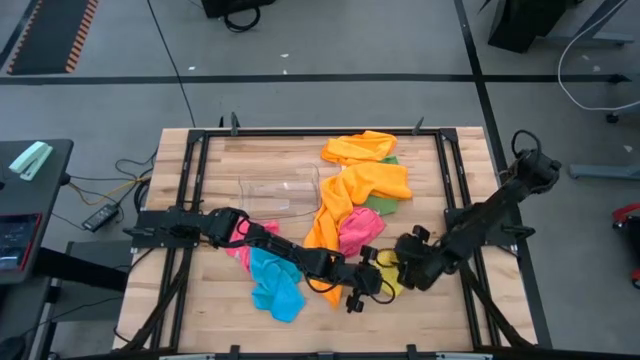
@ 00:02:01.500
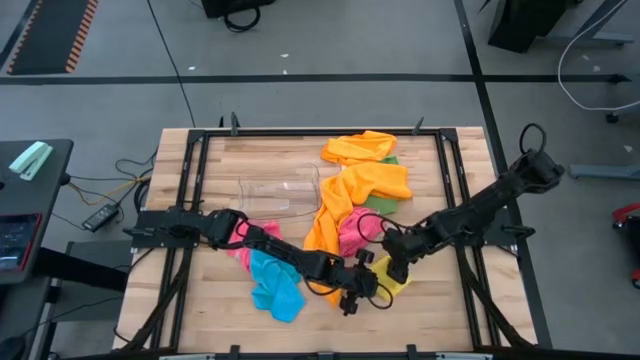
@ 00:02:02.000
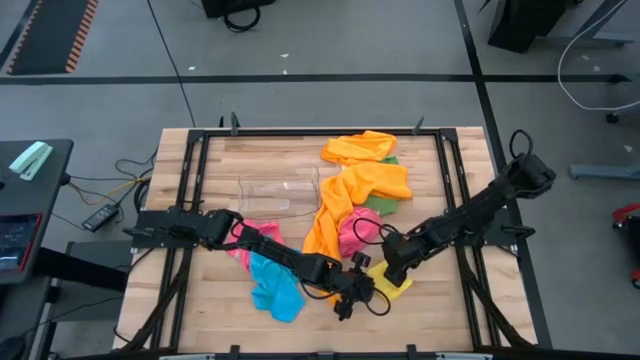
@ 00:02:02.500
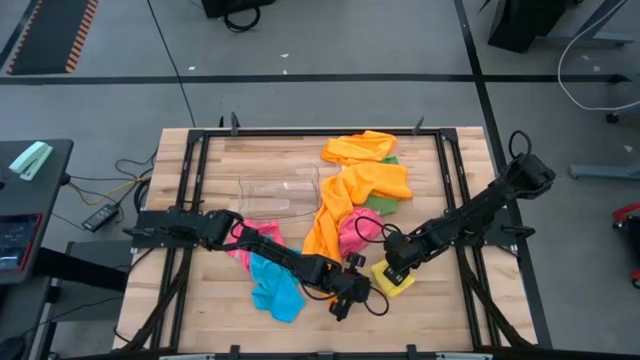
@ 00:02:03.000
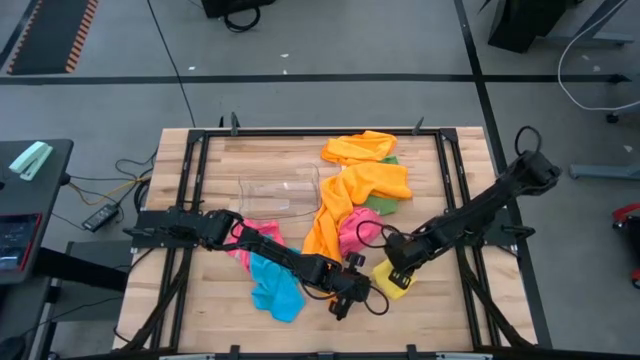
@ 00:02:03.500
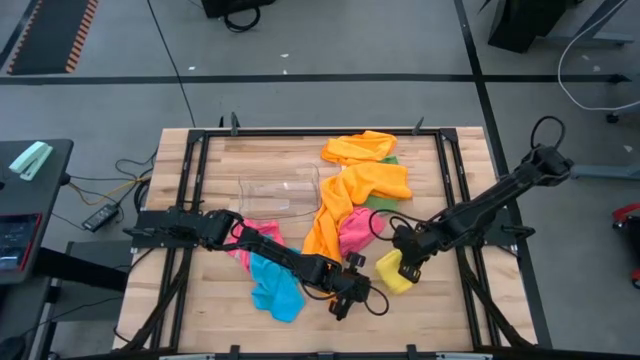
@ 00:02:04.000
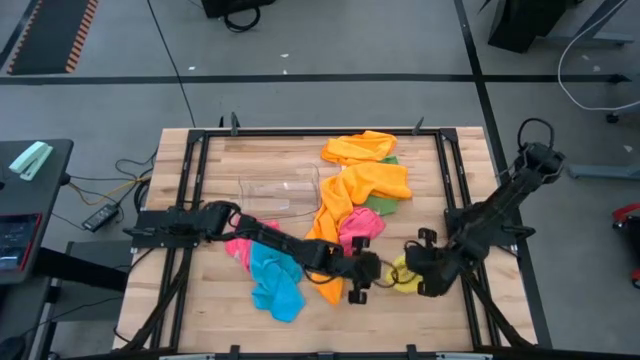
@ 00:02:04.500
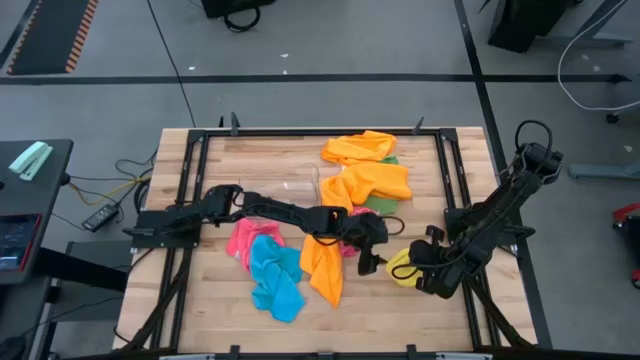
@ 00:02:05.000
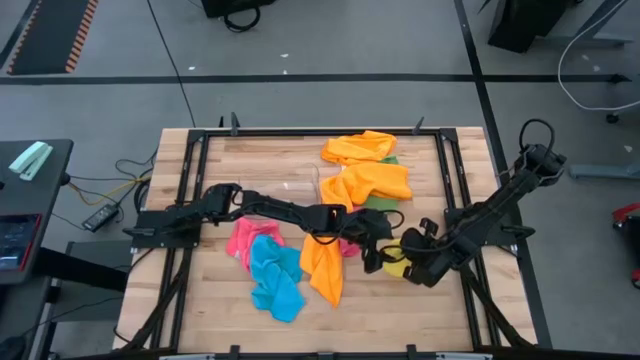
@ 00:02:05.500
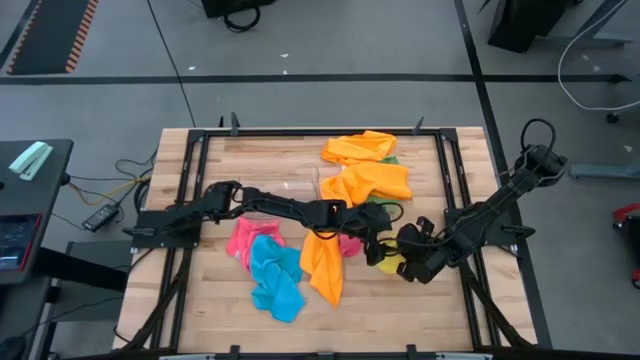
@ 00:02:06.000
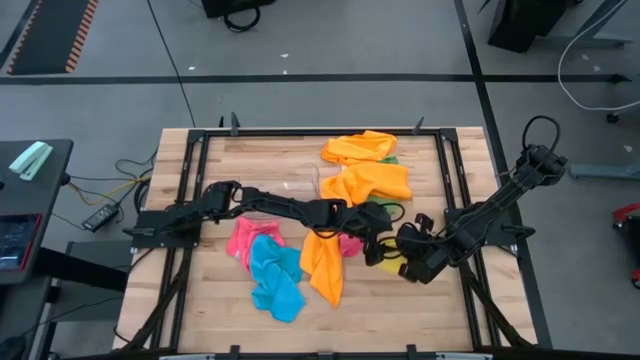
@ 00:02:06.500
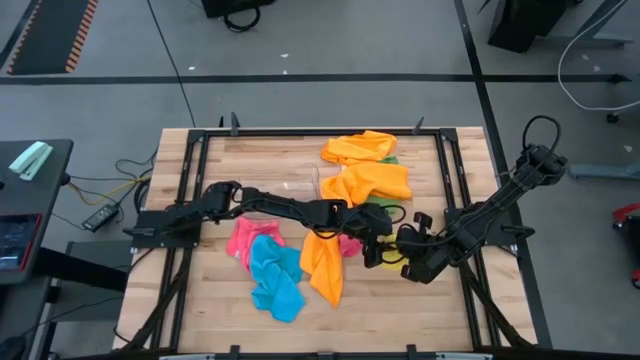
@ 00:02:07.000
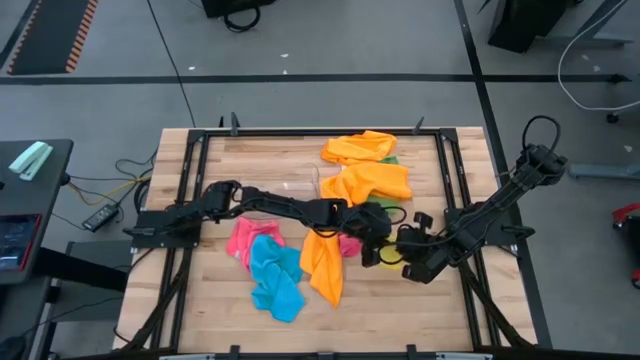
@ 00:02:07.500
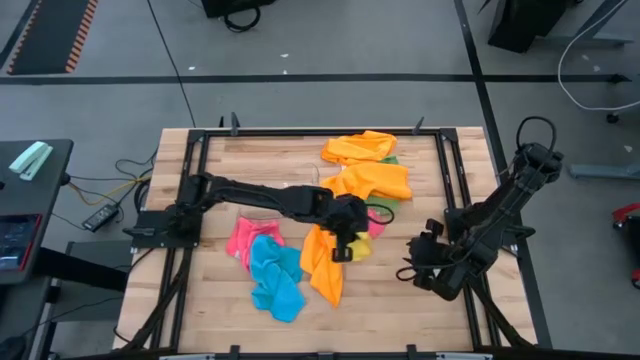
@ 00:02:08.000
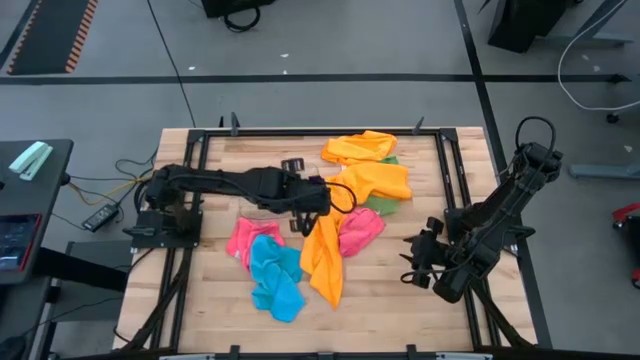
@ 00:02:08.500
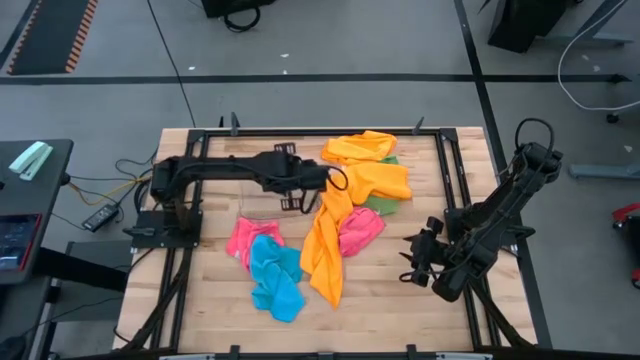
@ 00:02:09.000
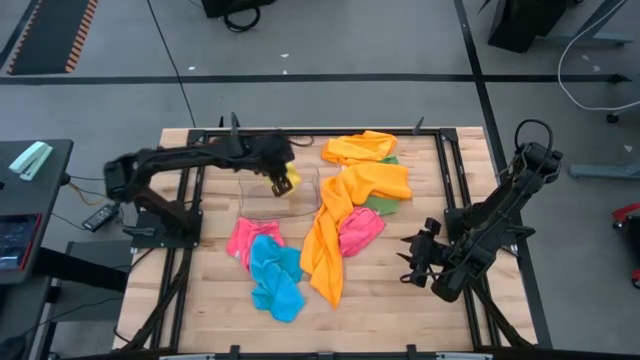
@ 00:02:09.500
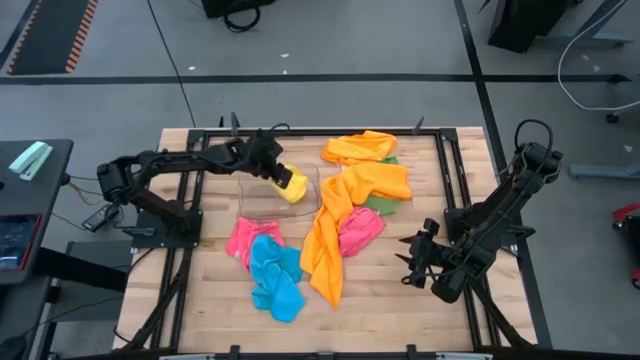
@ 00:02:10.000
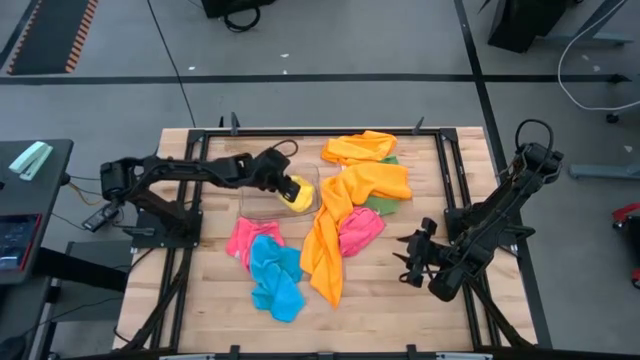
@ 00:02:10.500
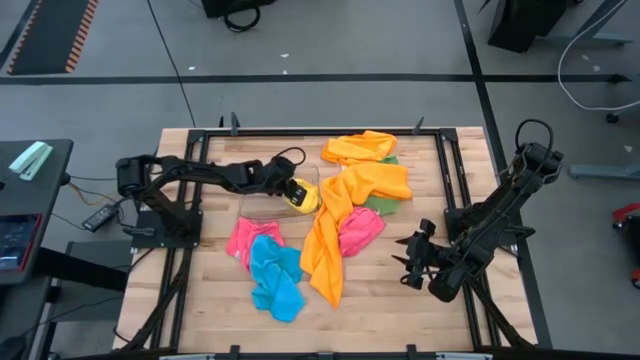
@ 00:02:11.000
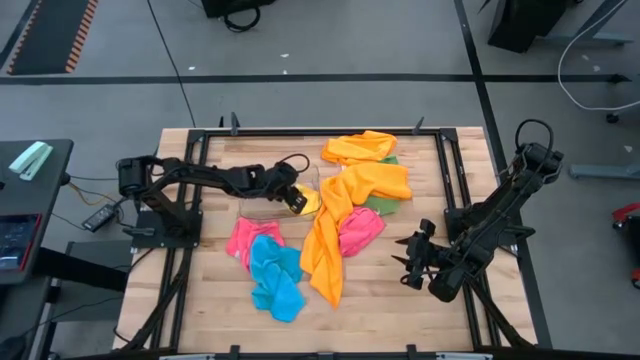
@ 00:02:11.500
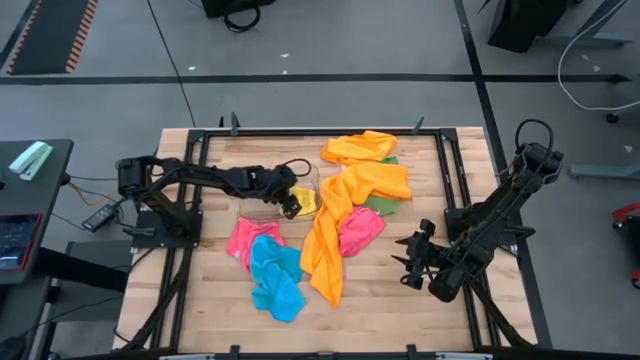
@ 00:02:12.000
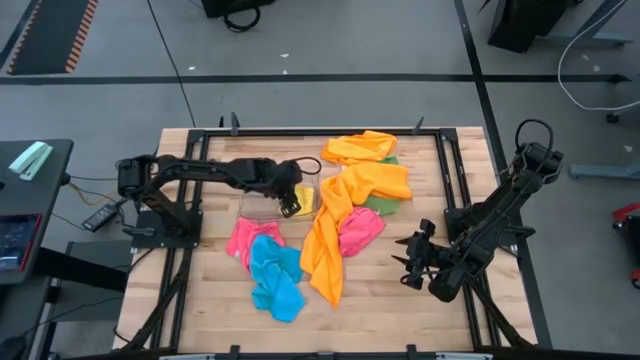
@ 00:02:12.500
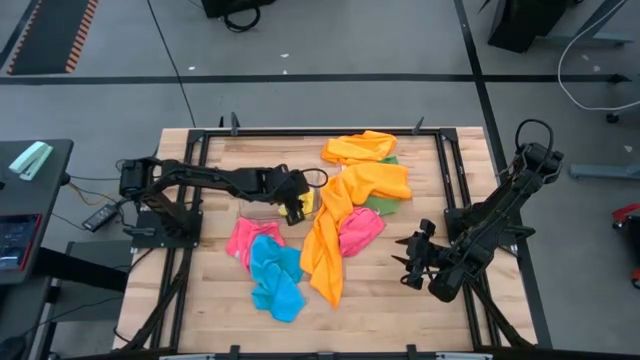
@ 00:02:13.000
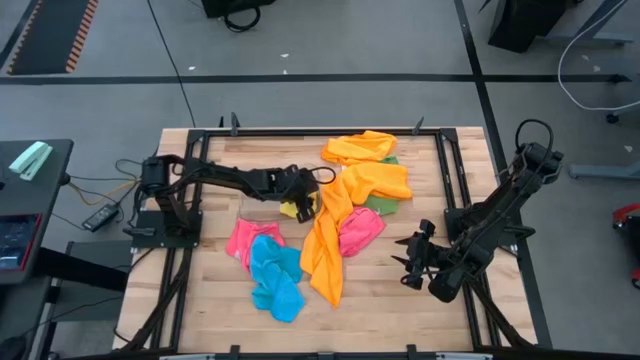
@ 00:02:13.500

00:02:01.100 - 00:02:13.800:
Task: Fold microfiber towels
Put the folded yellow microfiber cloth into the transparent bin
